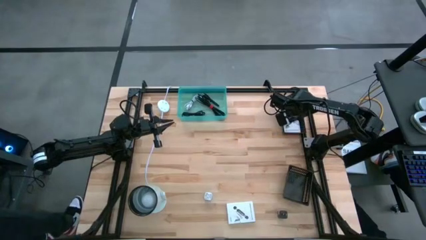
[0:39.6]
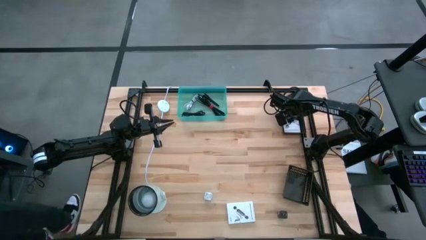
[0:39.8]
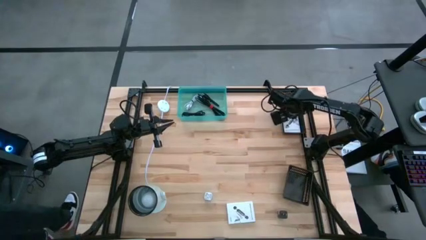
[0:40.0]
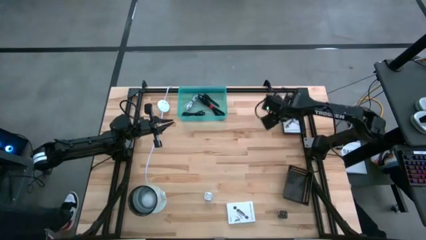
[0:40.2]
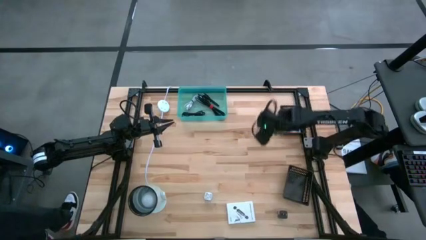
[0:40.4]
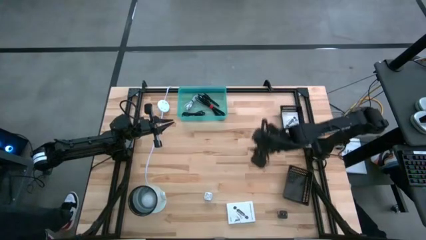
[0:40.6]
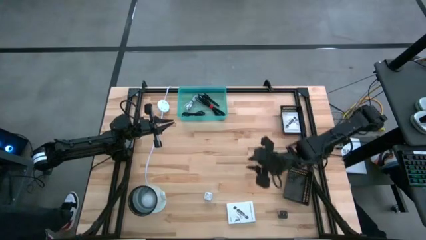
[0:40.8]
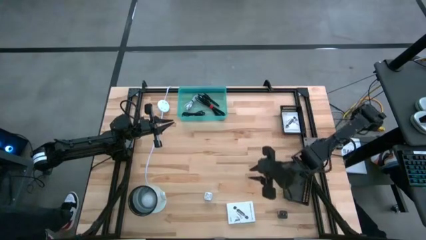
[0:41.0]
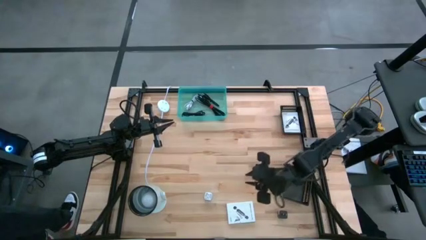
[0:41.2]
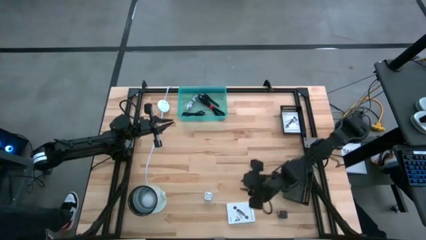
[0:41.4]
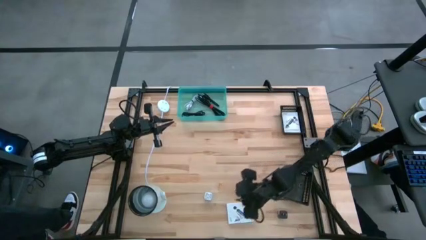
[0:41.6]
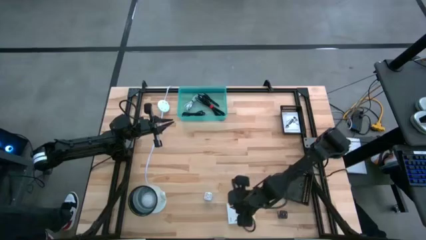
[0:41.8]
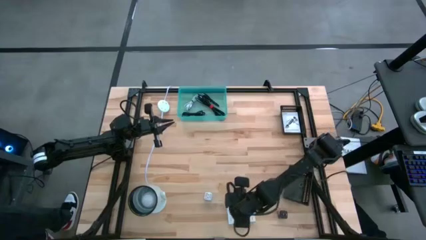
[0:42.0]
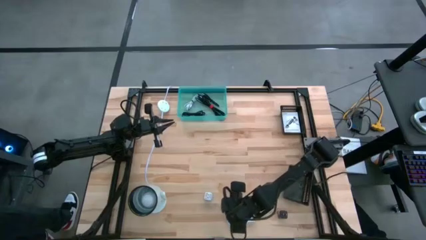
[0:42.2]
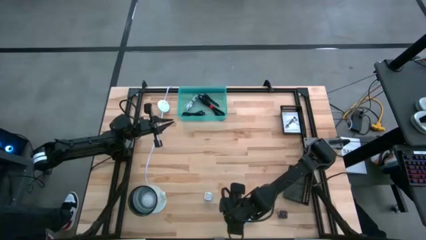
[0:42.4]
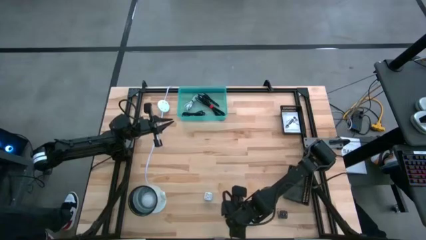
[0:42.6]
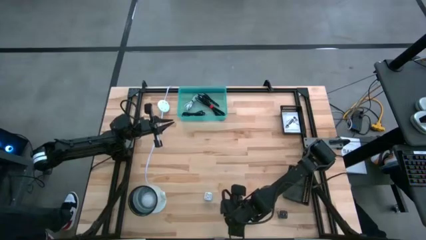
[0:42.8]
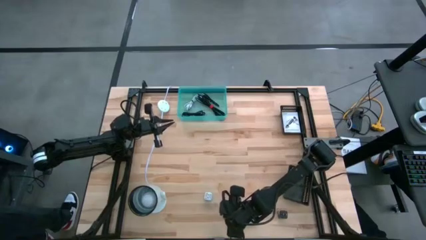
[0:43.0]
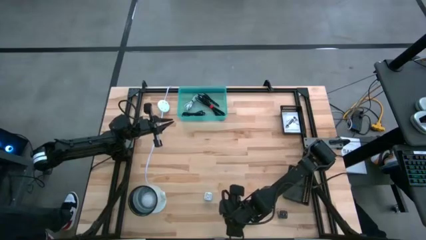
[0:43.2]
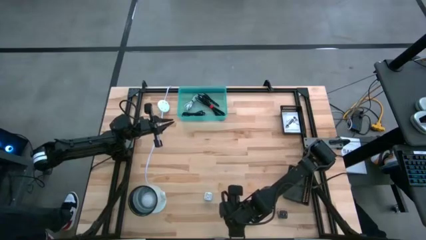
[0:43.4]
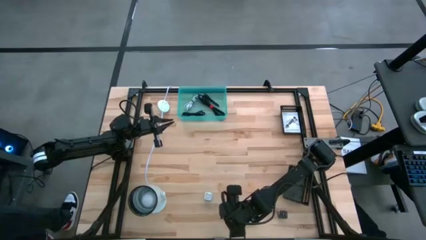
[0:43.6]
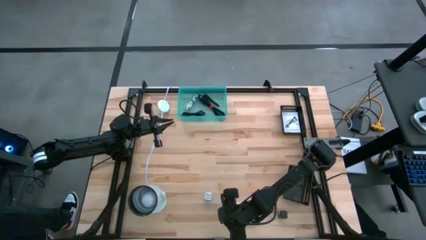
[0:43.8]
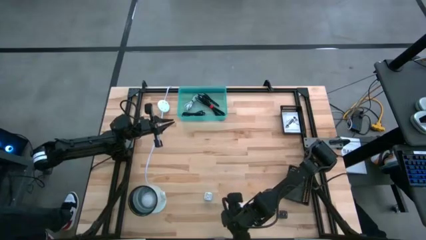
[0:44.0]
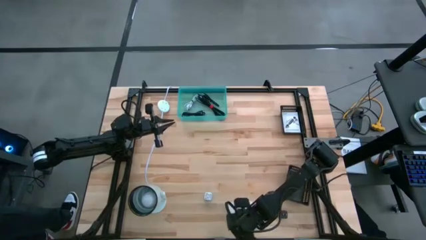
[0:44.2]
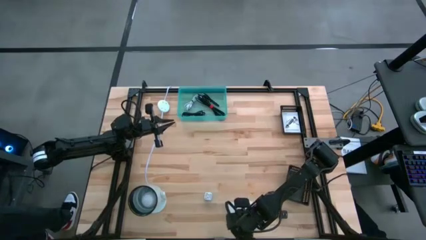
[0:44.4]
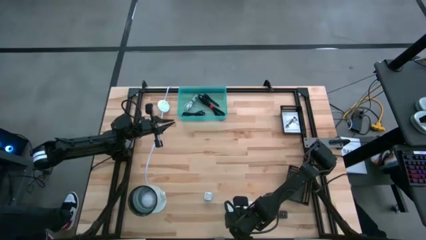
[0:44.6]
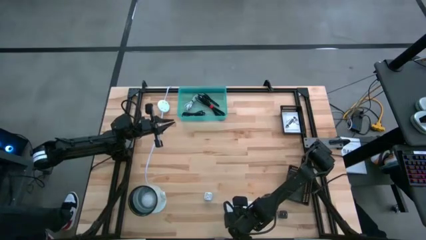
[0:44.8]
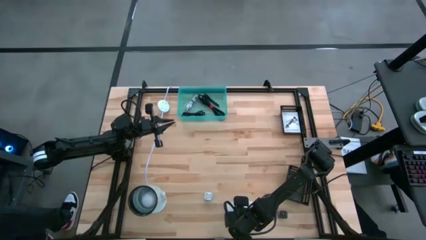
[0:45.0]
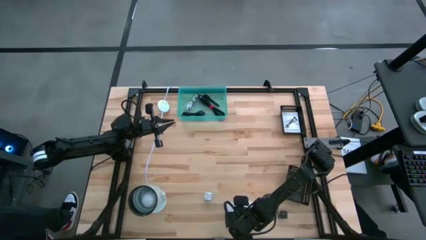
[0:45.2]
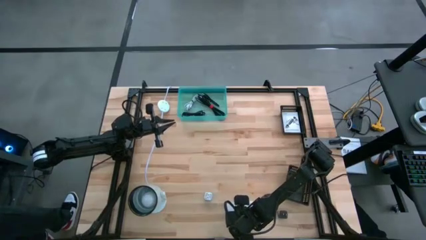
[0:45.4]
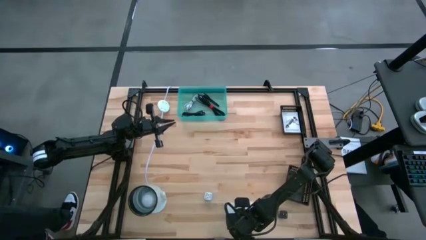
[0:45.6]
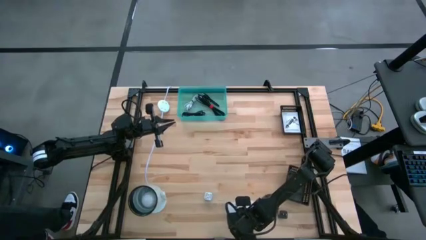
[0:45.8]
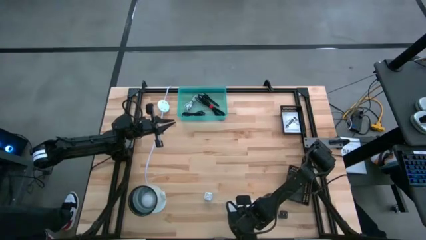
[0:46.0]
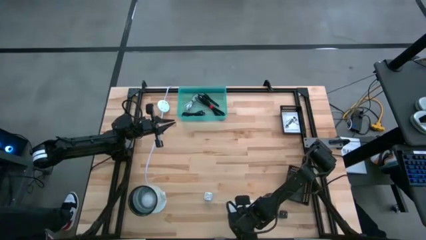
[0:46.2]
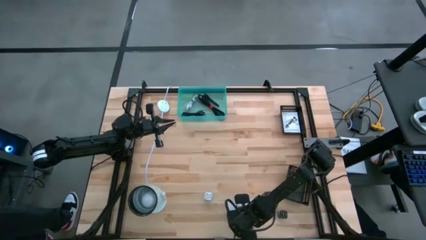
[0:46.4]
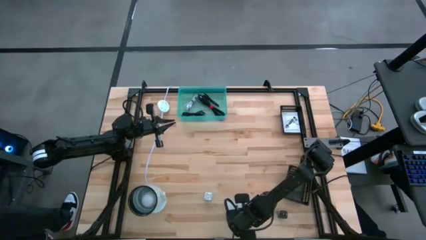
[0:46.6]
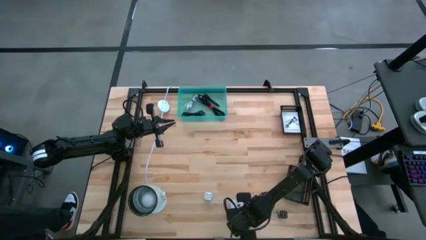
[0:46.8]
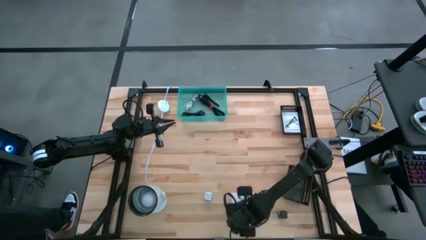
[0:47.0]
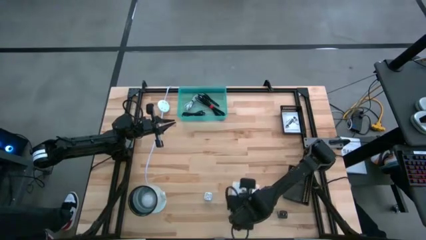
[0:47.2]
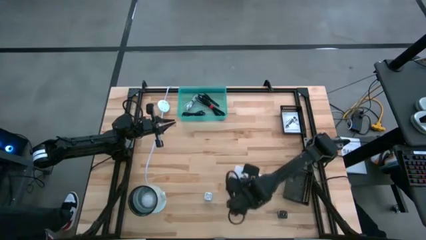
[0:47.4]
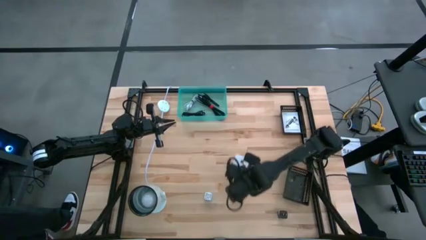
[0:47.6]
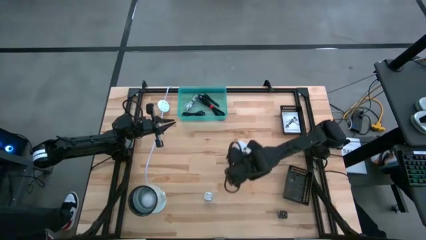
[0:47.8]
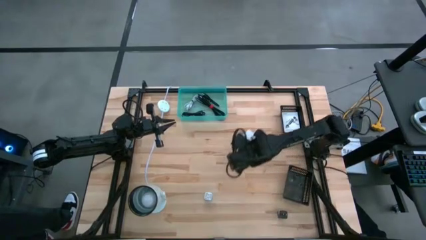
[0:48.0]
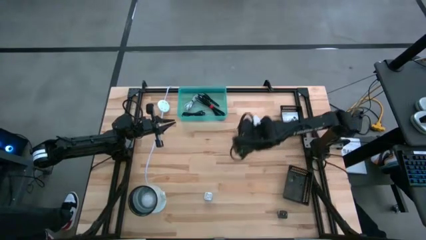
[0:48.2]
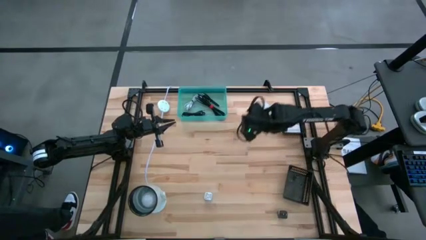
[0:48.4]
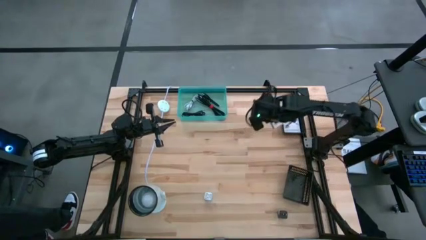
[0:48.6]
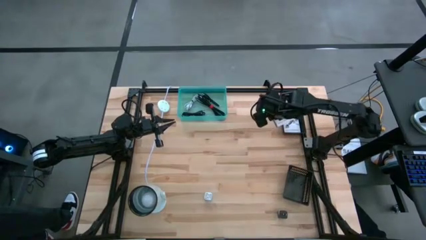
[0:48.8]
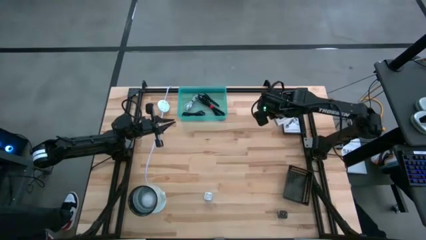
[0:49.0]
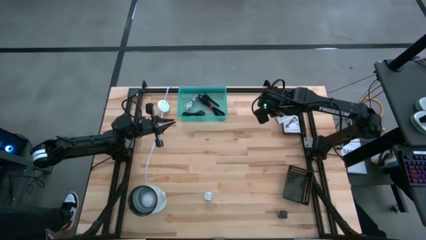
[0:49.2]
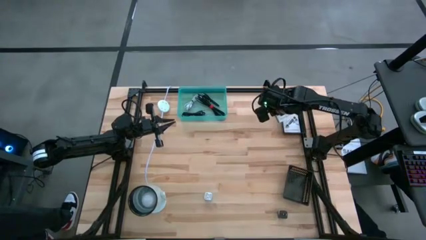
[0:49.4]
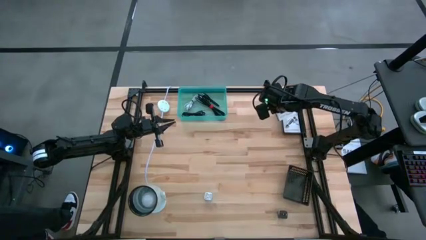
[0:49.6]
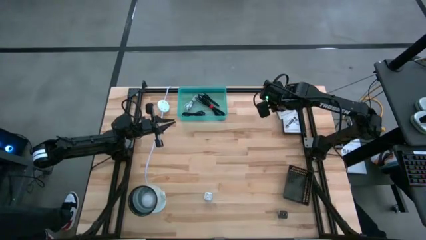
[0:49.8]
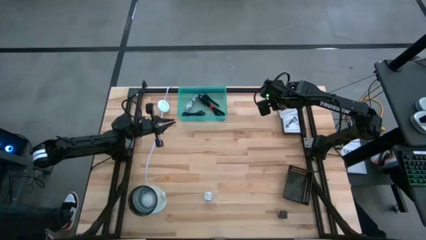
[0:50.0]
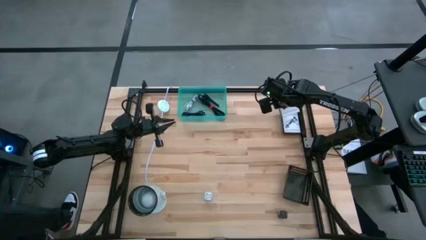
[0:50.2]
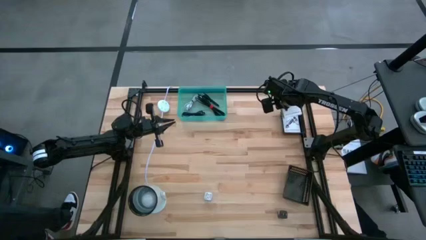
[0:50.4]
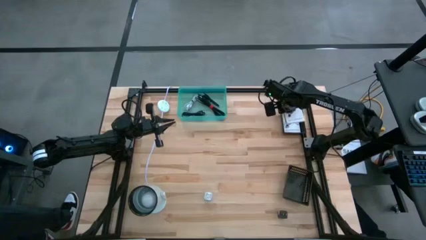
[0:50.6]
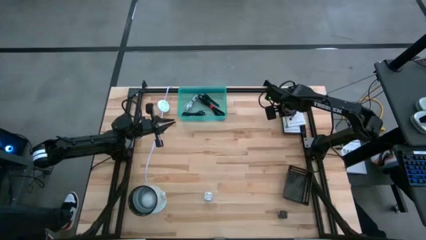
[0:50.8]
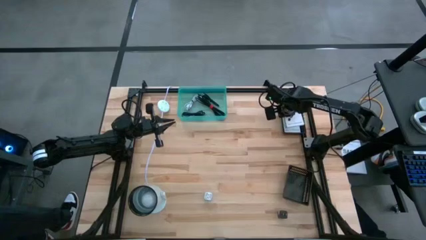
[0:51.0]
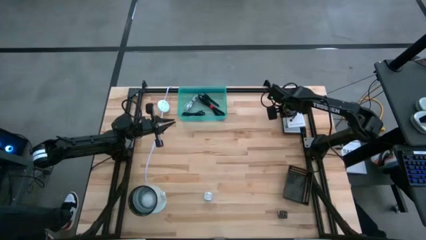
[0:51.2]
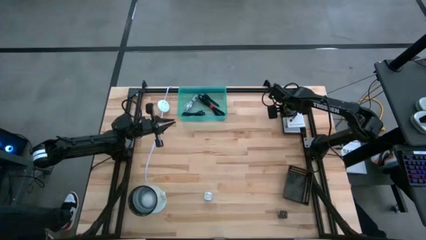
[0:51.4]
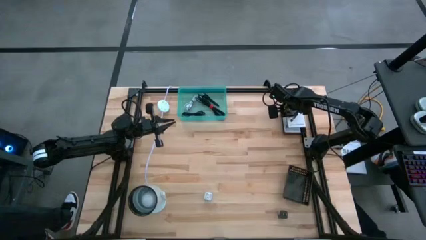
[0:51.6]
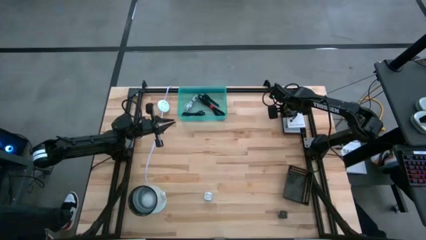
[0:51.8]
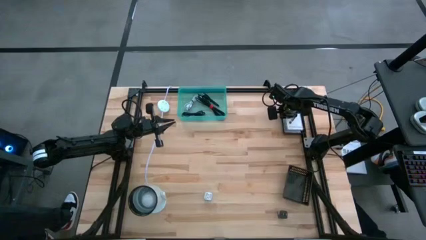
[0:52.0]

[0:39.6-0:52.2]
Task: Pick and place items into bin
Put the card reader box into the top black bin

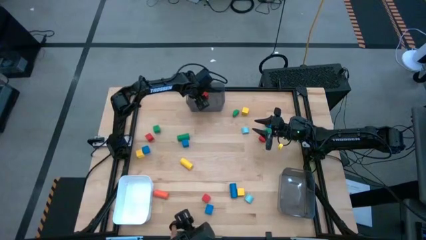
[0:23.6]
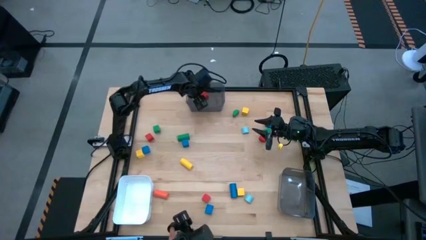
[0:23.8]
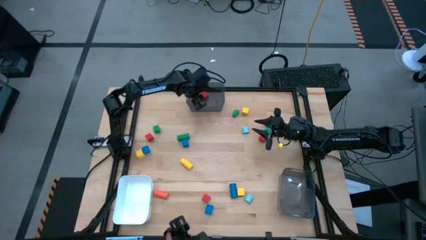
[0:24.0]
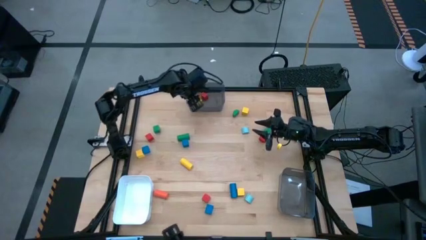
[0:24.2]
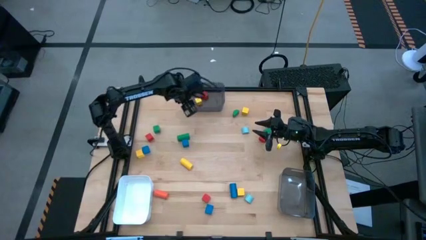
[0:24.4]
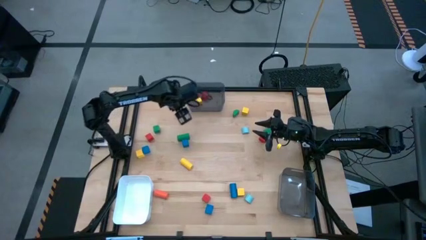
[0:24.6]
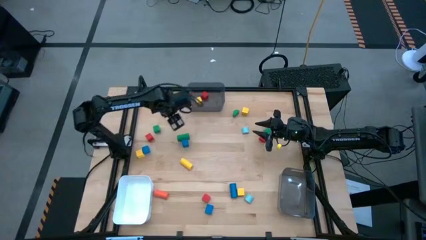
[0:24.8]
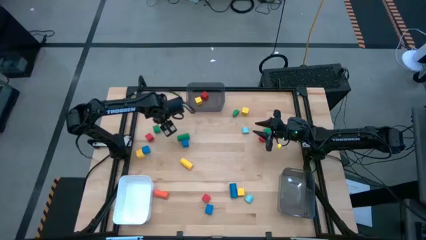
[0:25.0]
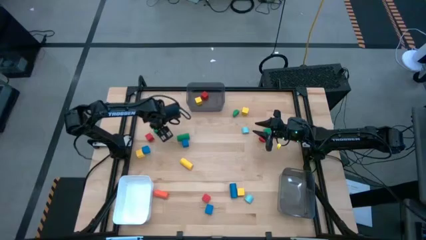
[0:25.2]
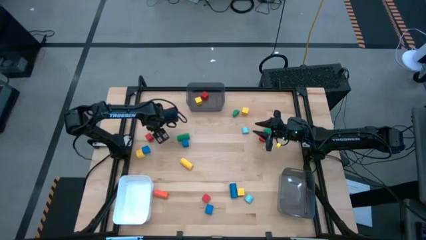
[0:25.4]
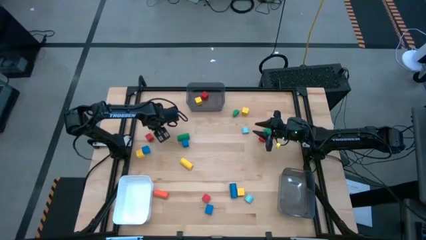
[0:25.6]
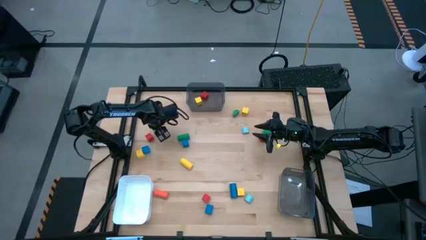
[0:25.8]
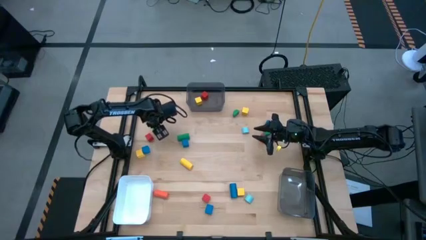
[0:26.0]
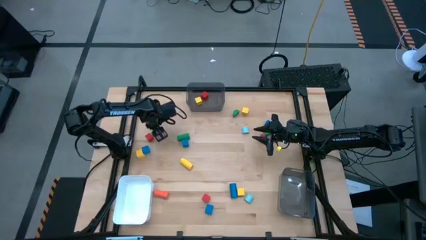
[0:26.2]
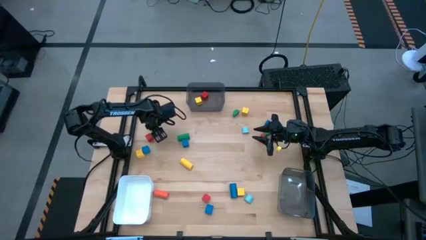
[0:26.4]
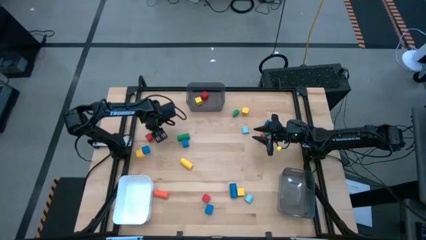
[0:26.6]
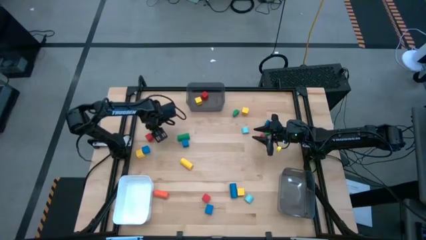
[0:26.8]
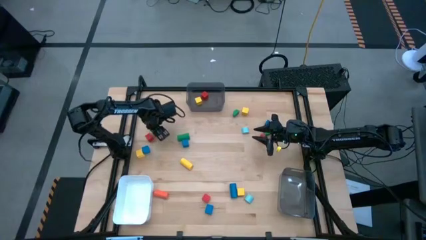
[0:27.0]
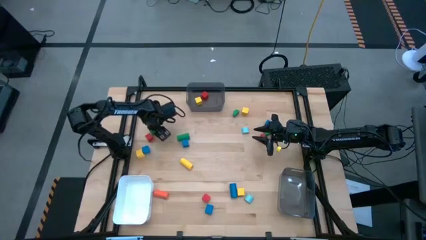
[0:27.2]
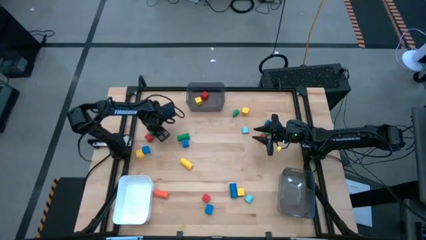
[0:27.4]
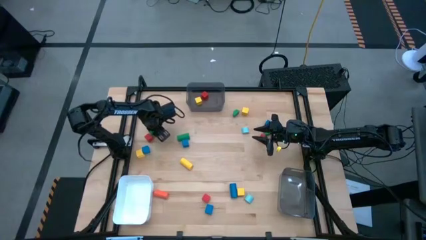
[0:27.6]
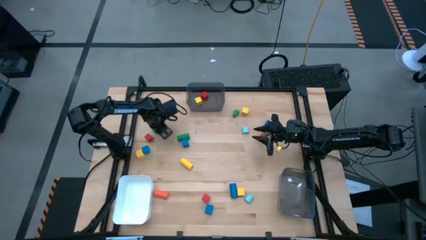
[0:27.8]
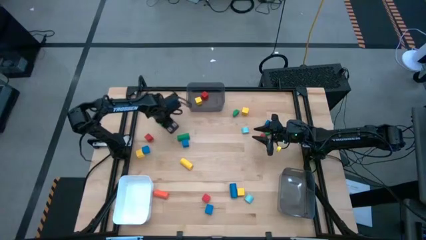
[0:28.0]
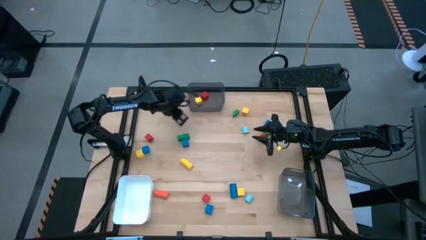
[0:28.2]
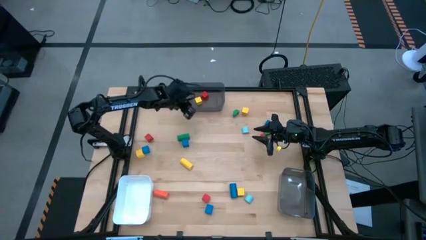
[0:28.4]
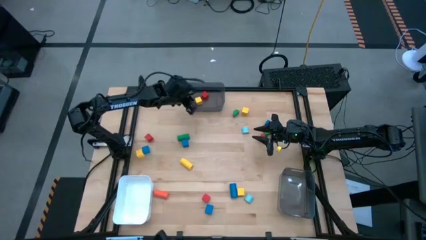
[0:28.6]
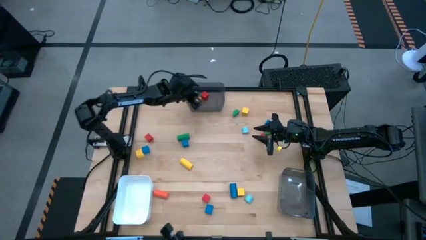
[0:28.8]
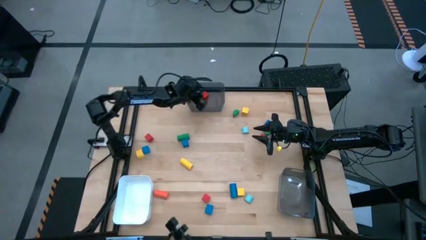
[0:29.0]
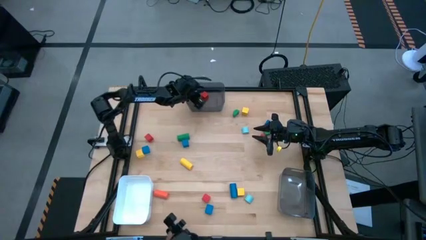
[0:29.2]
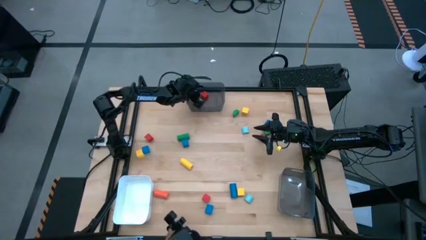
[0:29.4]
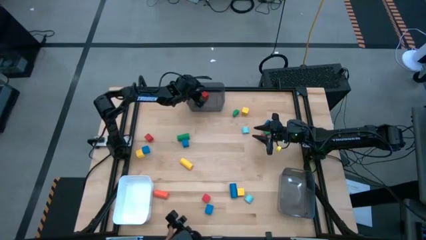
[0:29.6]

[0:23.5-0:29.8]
Task: Sort blocks by size
Put the green square block into the top black bin
